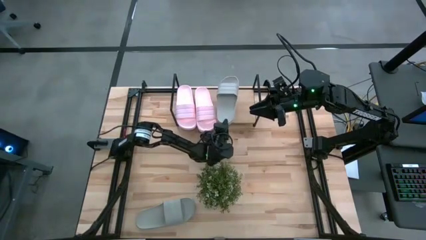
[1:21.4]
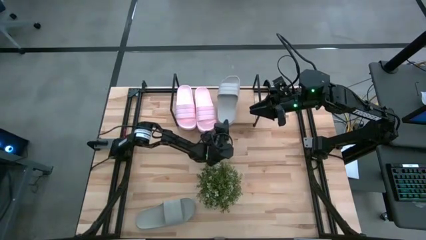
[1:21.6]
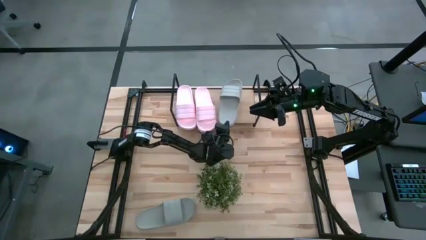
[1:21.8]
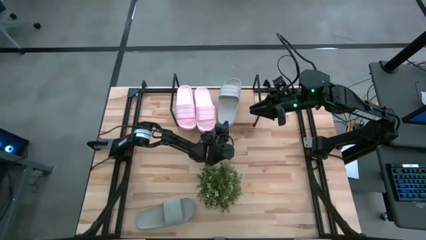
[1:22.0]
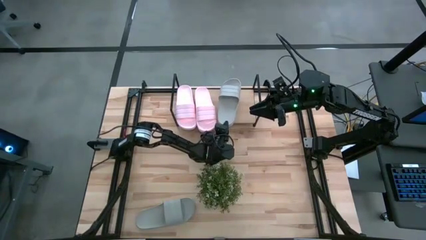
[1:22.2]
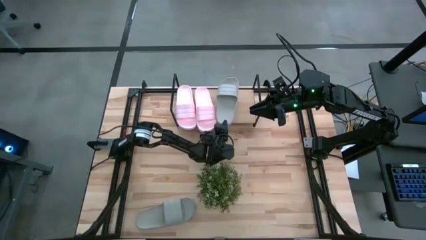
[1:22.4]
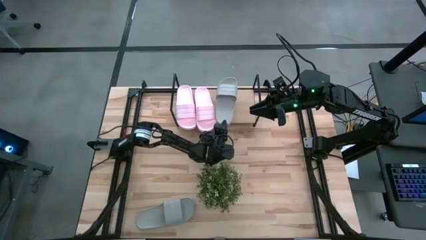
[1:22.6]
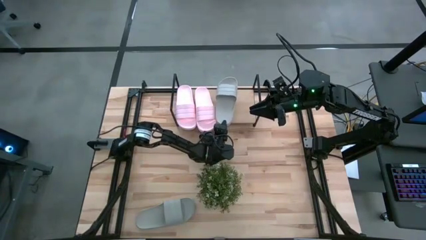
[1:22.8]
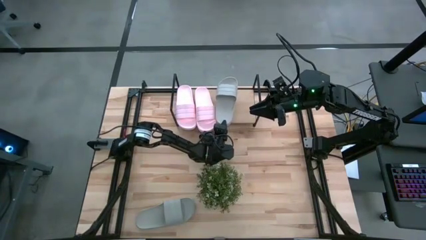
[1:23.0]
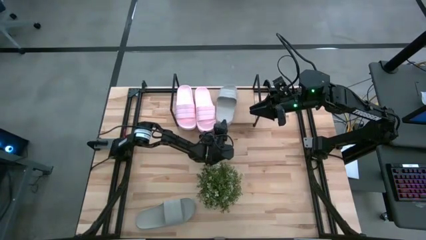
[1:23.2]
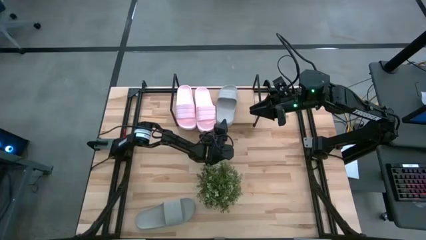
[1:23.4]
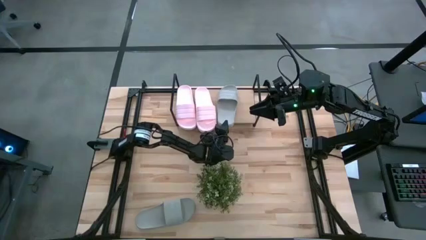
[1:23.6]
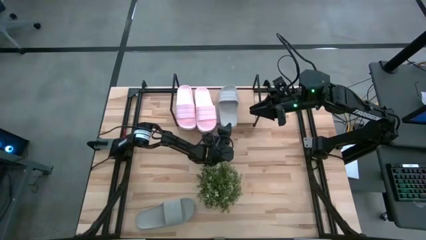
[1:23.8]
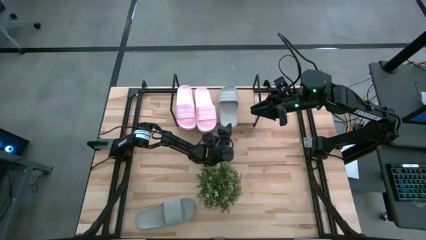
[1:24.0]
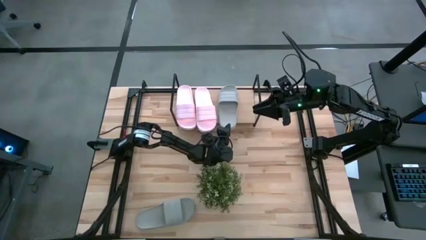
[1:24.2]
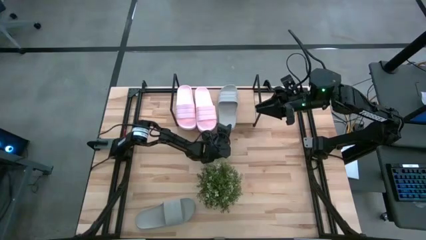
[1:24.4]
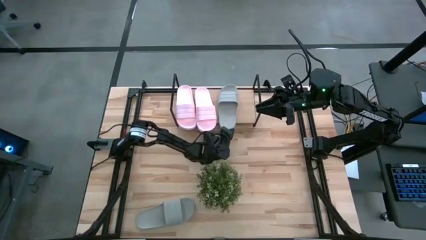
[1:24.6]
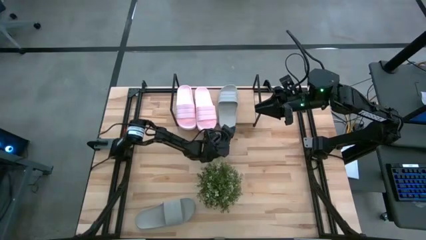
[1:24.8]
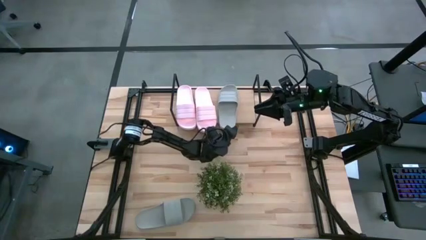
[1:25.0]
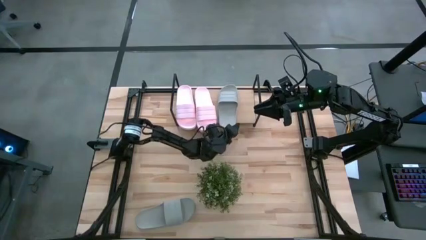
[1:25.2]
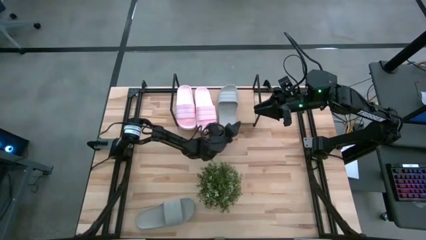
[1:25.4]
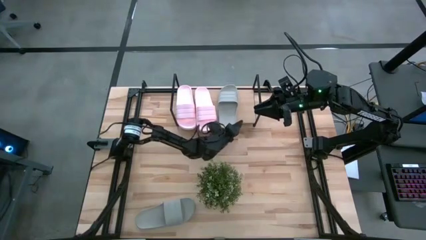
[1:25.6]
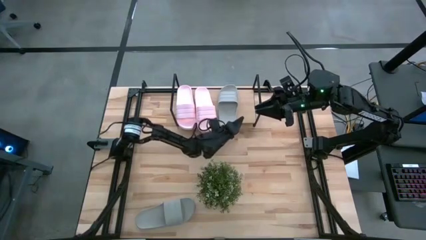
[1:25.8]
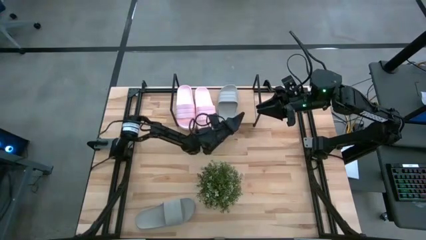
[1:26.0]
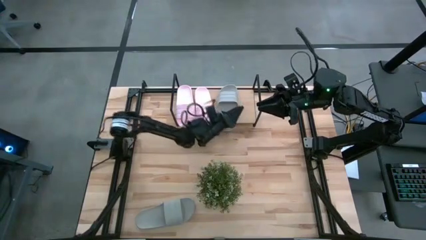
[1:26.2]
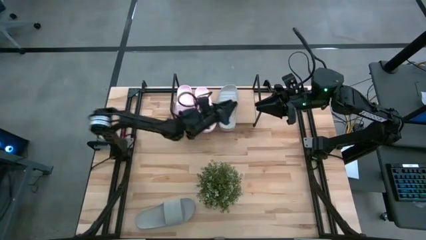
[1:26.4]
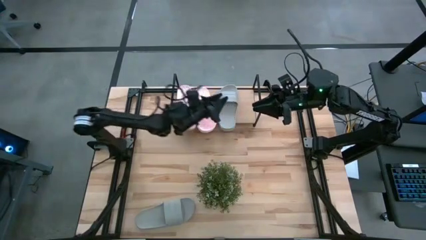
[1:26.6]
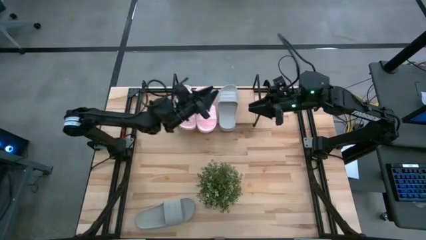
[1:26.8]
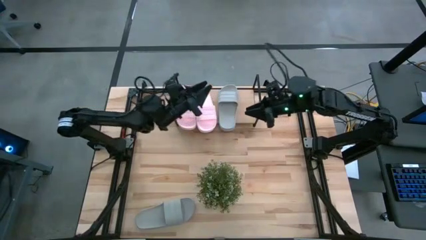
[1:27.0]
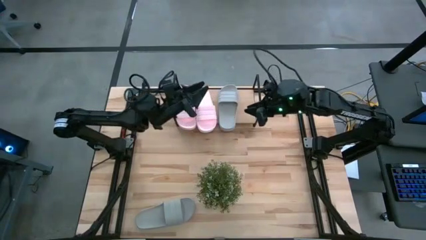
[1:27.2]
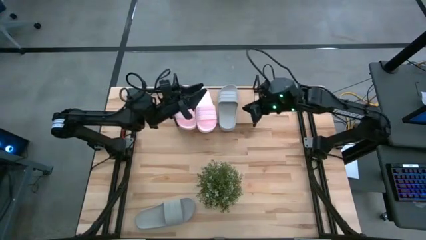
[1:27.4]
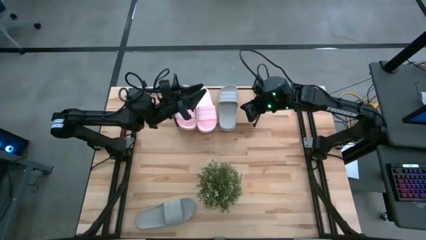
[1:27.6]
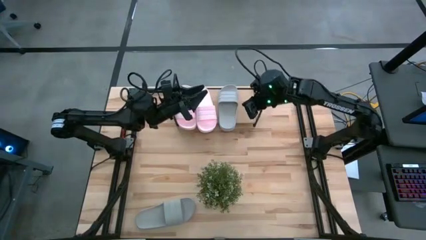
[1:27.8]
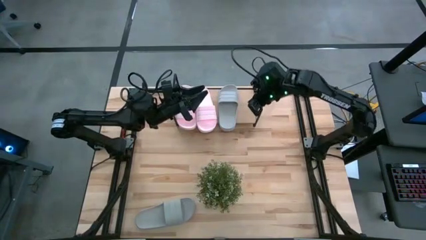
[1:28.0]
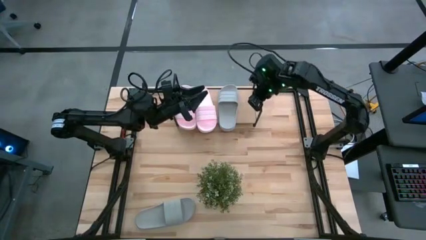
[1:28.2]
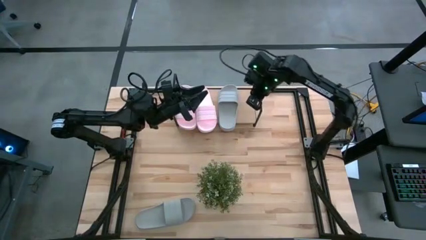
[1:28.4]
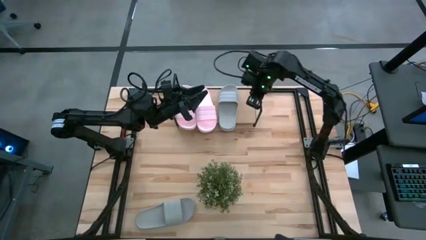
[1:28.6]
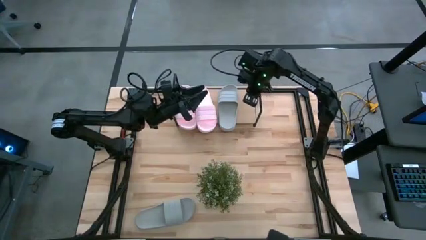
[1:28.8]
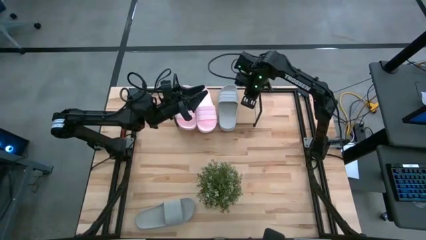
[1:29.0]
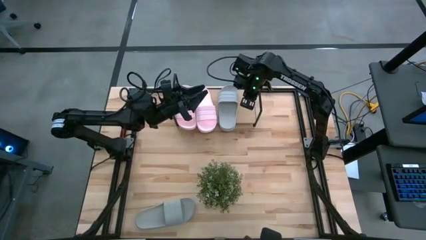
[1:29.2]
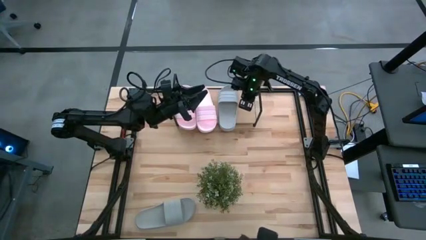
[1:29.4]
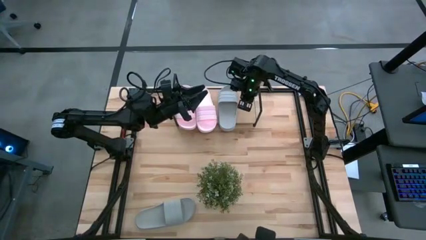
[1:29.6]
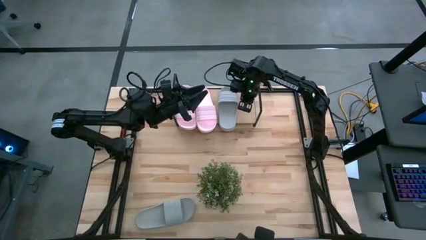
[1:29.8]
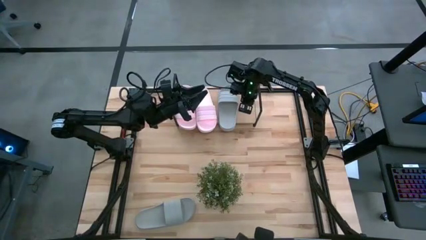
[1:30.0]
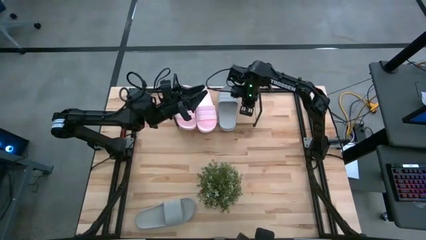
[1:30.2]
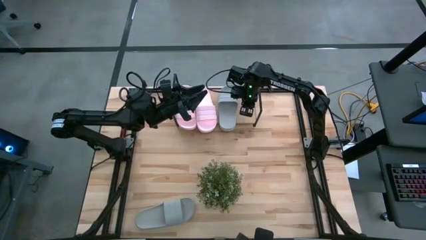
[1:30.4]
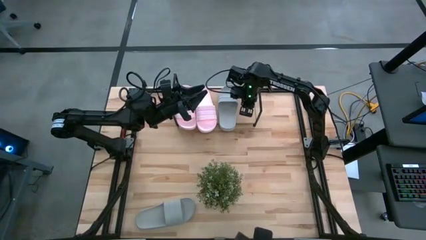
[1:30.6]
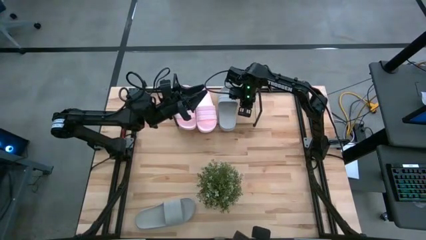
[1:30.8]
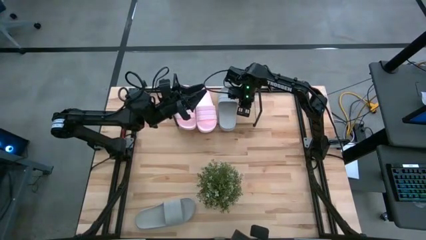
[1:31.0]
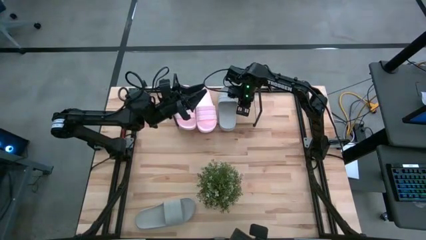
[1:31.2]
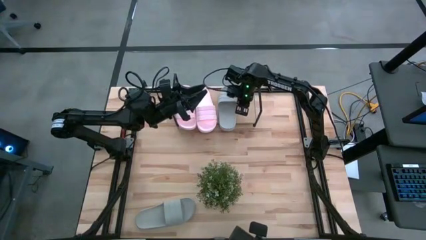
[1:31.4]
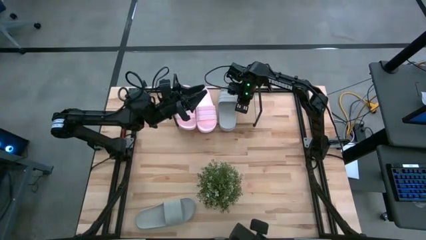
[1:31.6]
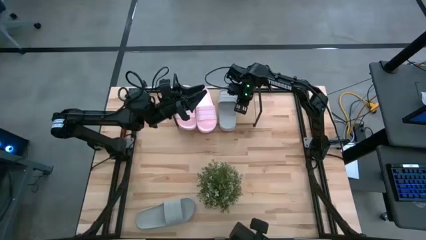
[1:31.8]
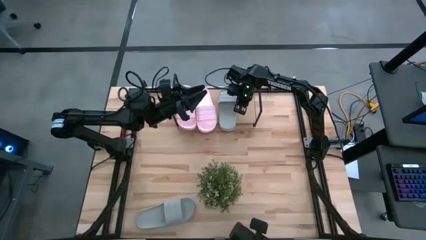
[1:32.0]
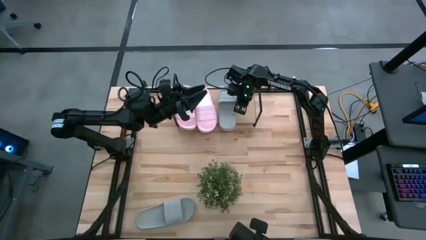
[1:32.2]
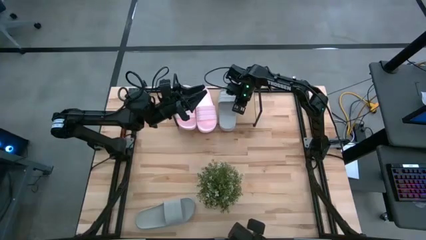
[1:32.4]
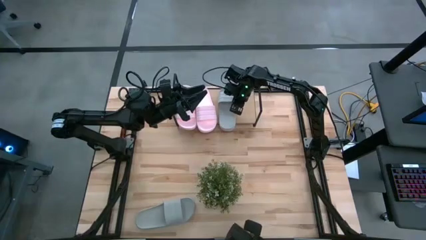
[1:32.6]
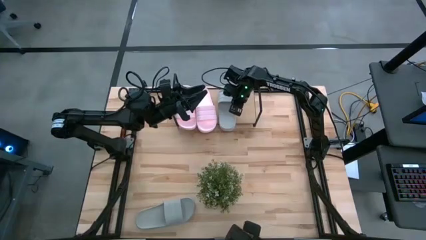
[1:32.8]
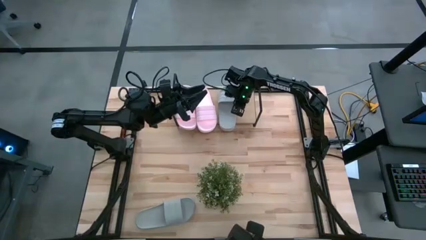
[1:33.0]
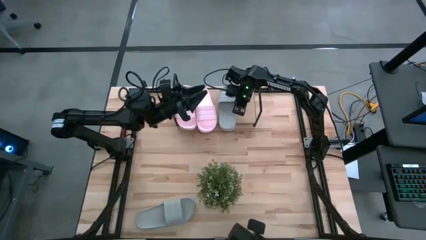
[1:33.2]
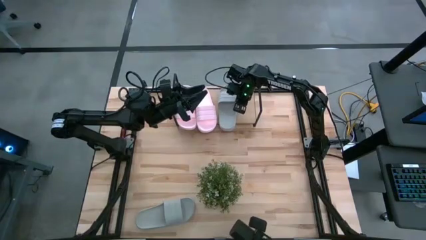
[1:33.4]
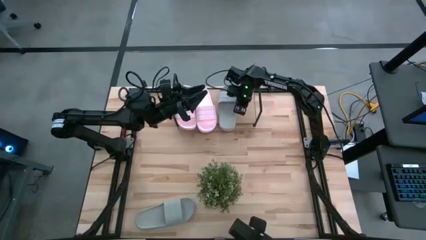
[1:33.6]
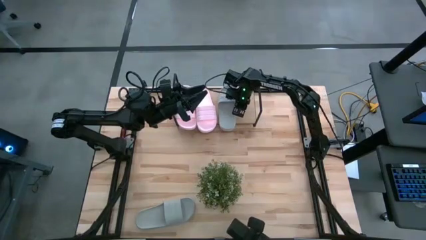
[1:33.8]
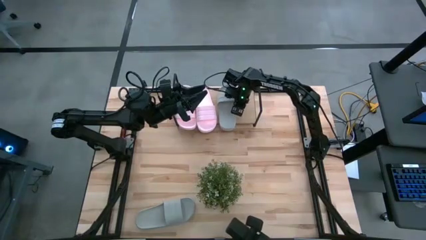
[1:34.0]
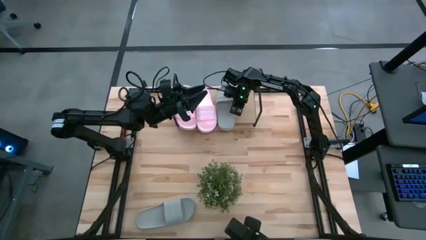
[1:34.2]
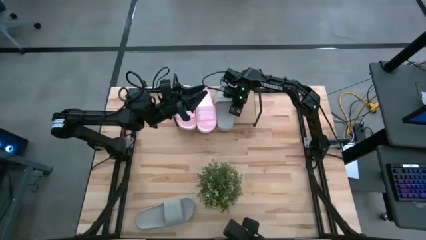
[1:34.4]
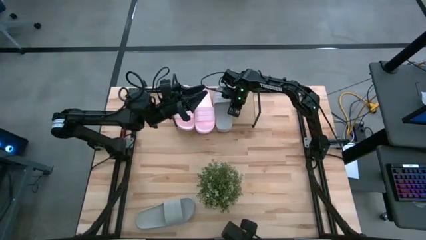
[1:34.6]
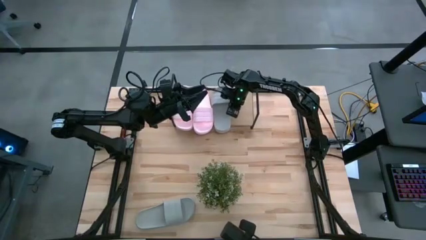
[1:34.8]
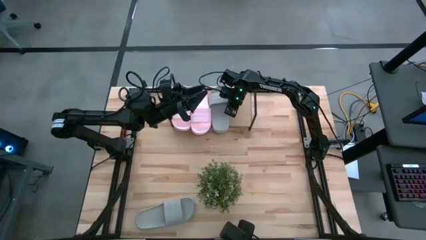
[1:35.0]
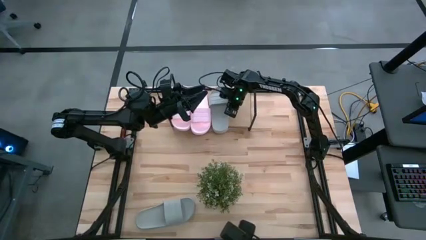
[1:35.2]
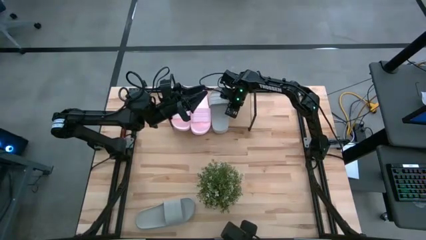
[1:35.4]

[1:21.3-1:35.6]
Task: Pick and place slides into the shelf
Put the top gray slide on the shelf

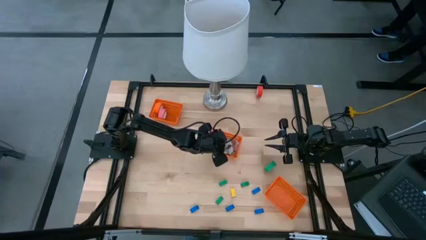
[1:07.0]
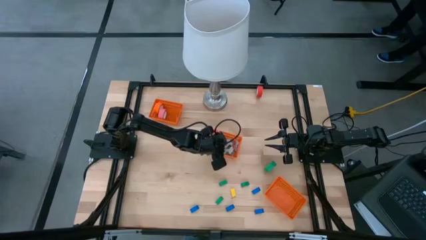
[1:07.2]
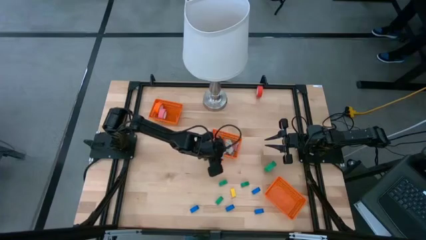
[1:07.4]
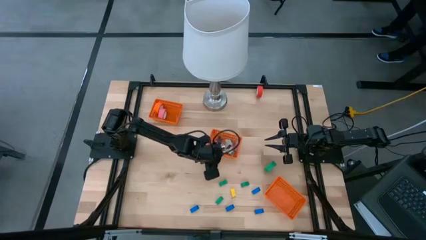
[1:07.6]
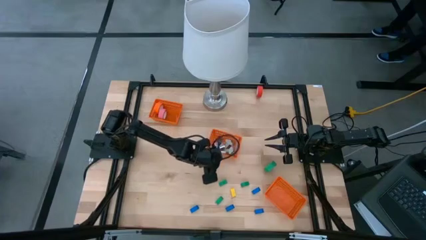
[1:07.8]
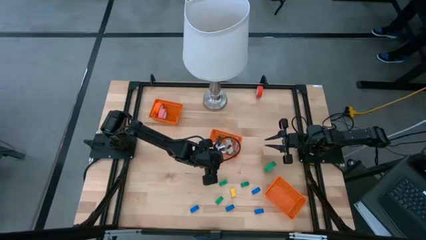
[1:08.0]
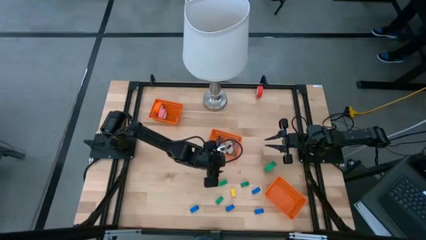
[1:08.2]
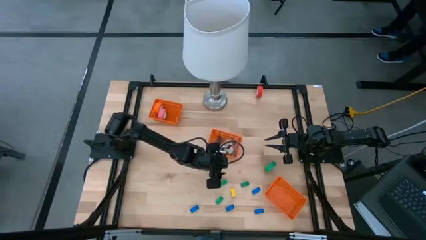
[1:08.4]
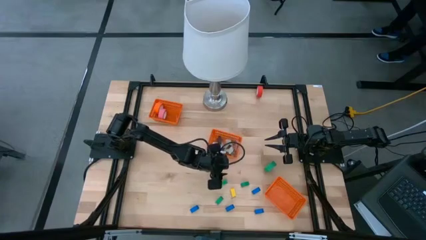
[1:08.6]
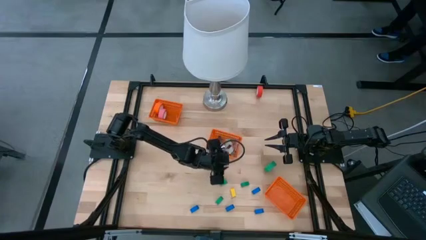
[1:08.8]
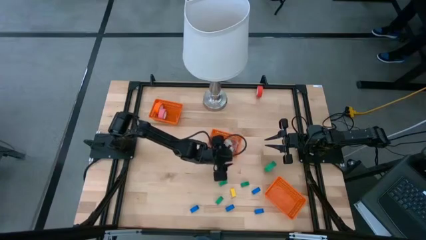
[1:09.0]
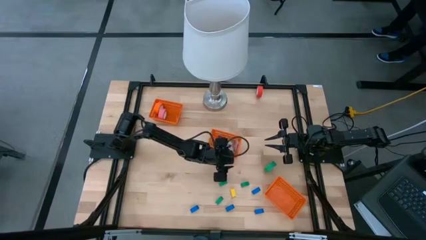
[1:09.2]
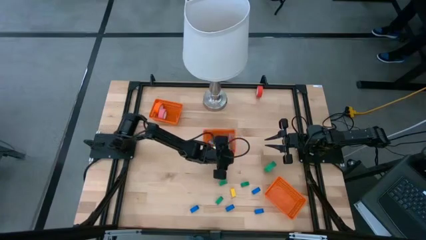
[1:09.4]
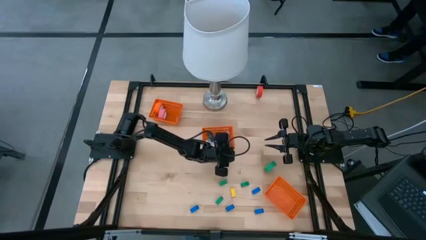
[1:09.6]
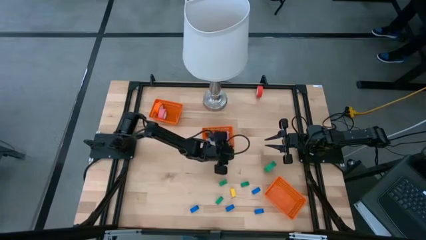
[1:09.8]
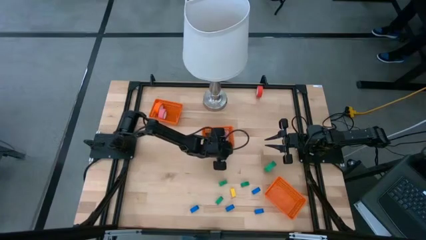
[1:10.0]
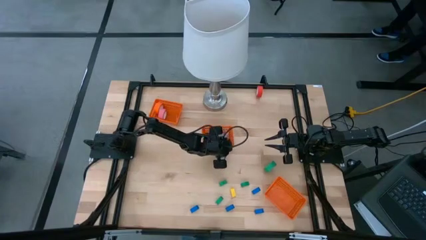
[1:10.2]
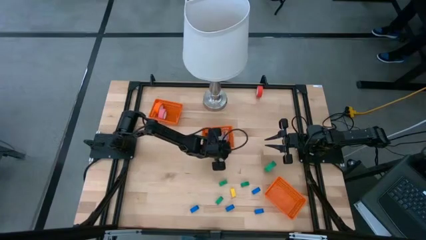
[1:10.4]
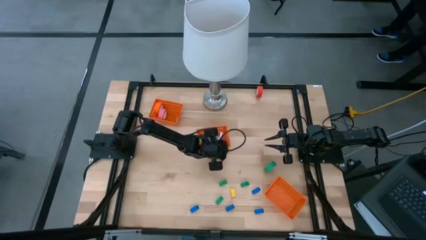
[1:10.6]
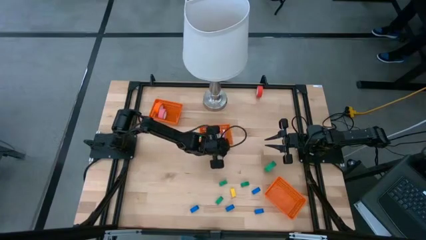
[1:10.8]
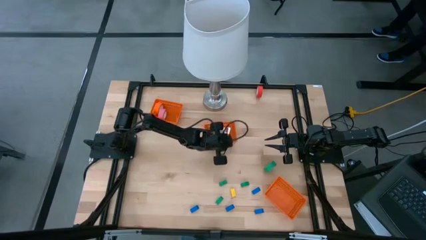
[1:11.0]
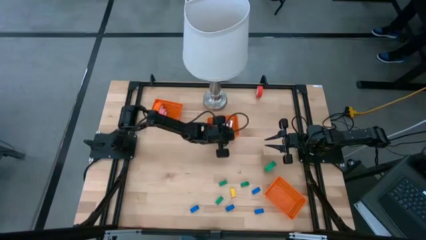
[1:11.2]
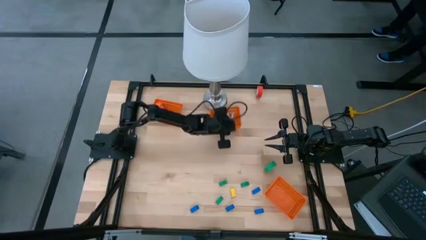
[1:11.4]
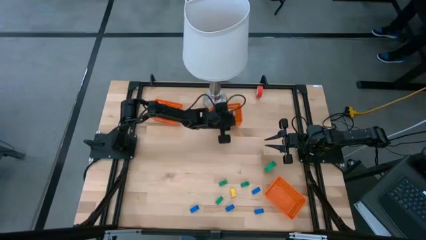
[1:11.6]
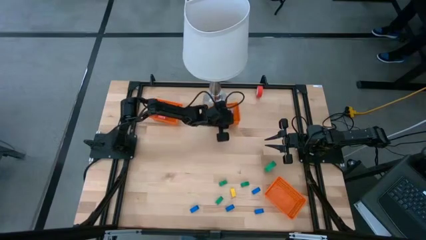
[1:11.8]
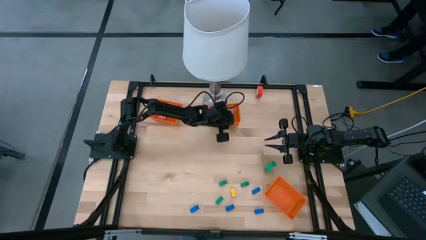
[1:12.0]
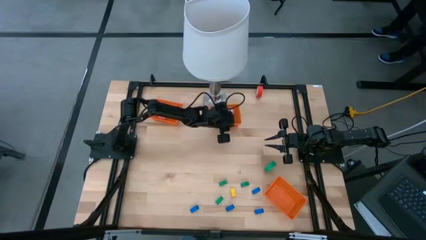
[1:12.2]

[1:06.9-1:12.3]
Task: Pick and place Stapler, Stapler remover, tape
Move the middle orange bin to the top of the table
